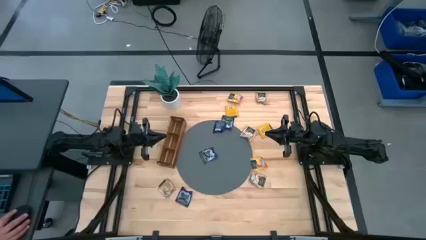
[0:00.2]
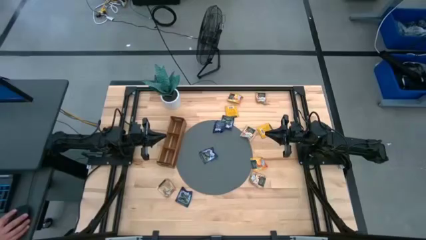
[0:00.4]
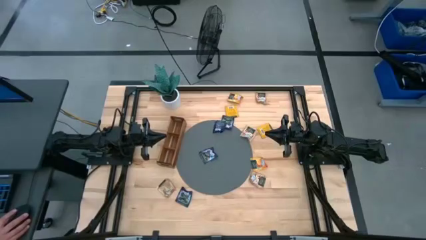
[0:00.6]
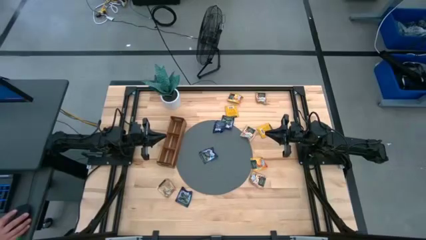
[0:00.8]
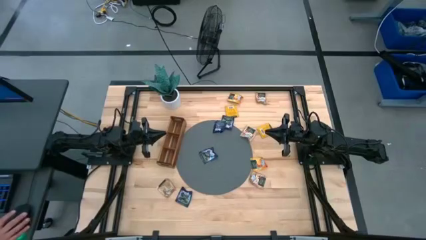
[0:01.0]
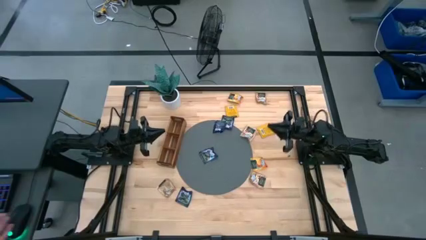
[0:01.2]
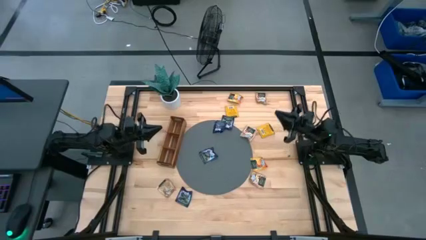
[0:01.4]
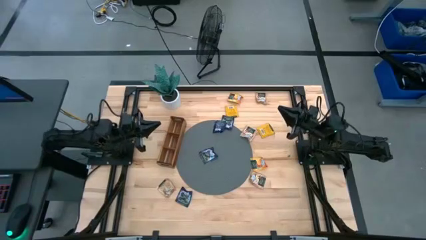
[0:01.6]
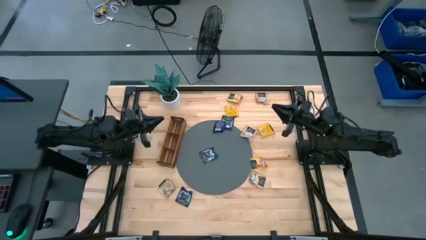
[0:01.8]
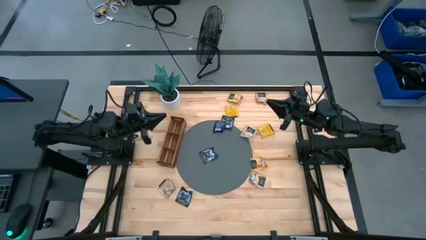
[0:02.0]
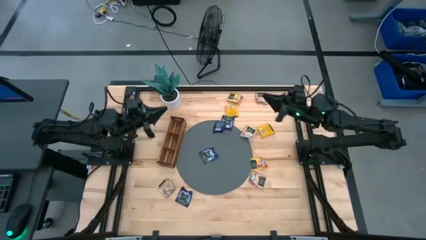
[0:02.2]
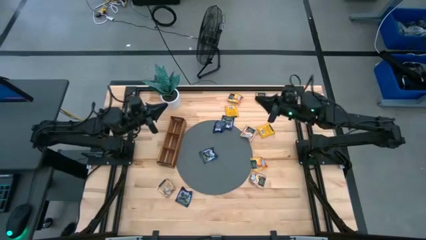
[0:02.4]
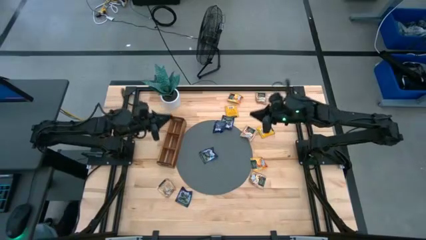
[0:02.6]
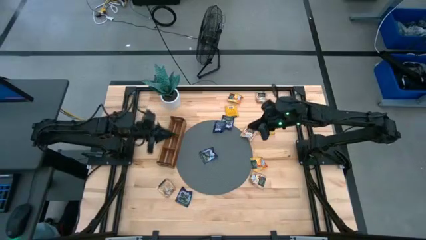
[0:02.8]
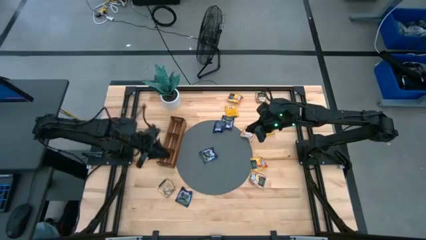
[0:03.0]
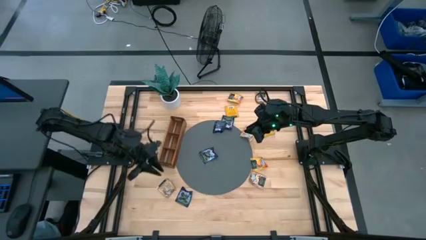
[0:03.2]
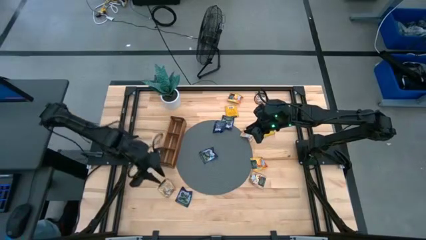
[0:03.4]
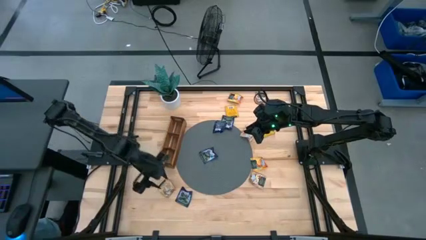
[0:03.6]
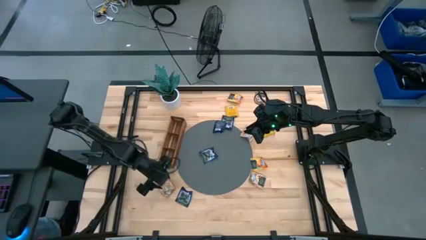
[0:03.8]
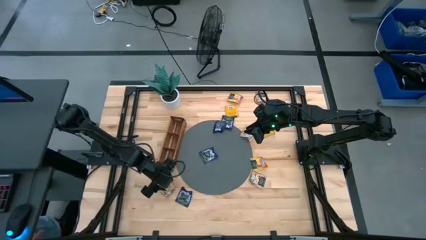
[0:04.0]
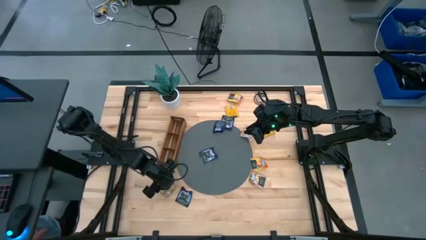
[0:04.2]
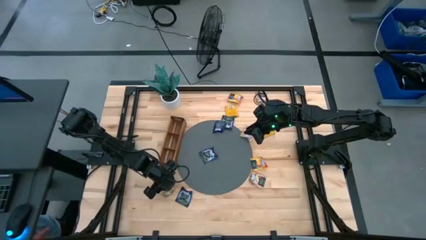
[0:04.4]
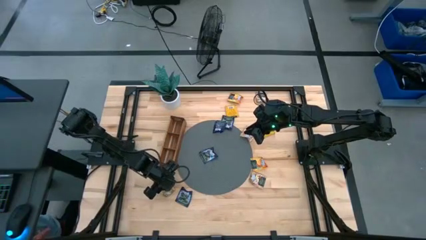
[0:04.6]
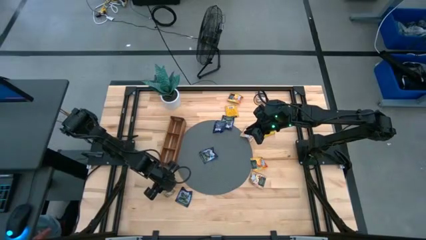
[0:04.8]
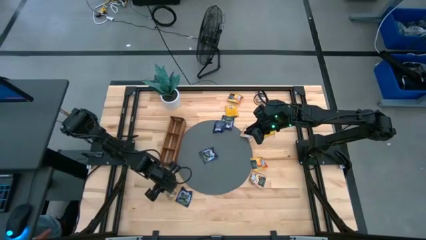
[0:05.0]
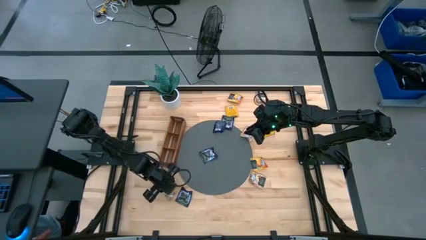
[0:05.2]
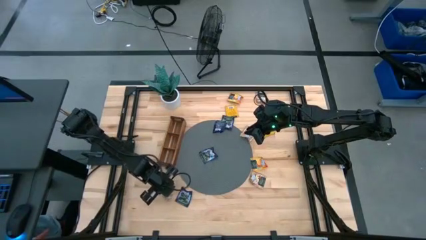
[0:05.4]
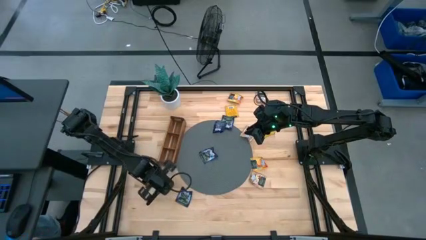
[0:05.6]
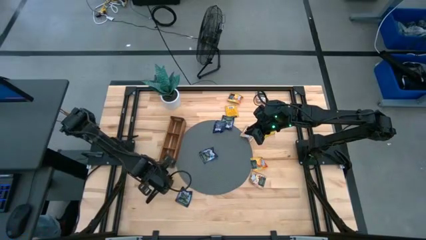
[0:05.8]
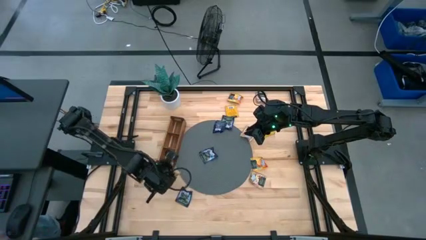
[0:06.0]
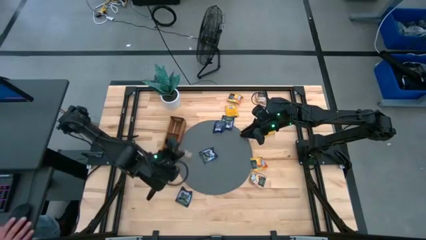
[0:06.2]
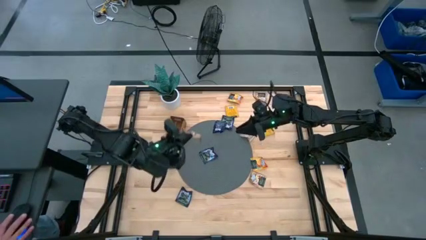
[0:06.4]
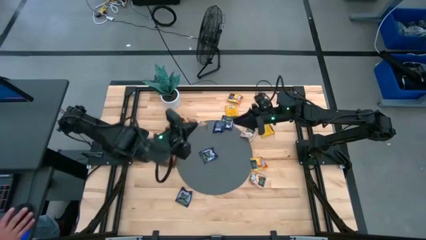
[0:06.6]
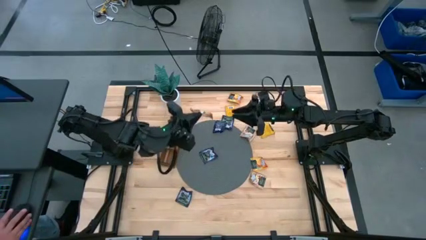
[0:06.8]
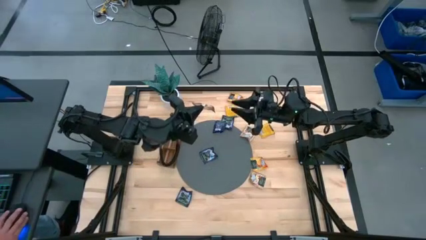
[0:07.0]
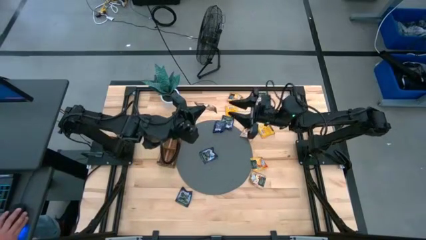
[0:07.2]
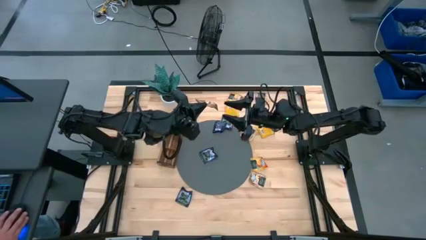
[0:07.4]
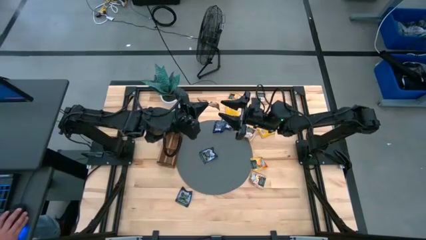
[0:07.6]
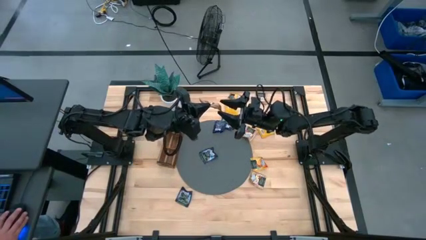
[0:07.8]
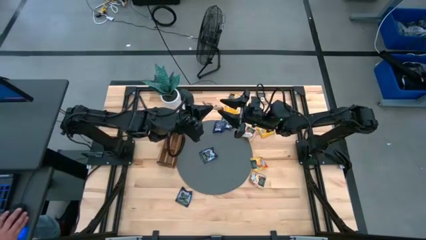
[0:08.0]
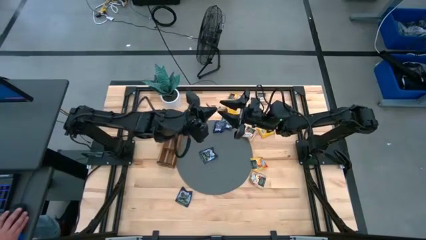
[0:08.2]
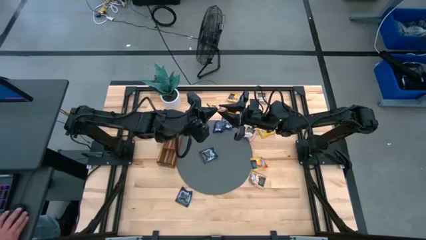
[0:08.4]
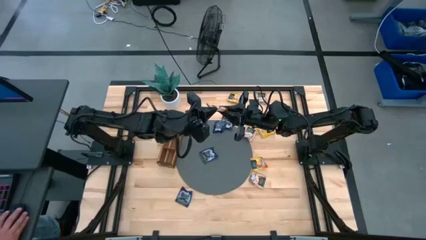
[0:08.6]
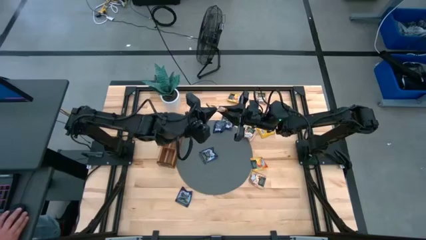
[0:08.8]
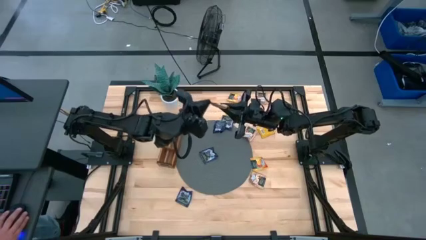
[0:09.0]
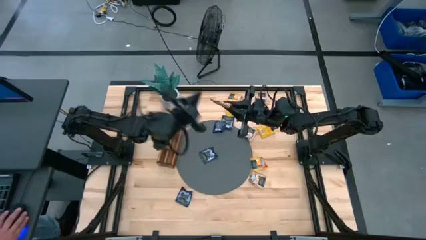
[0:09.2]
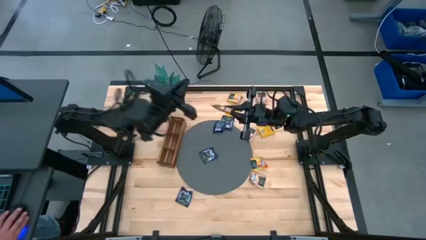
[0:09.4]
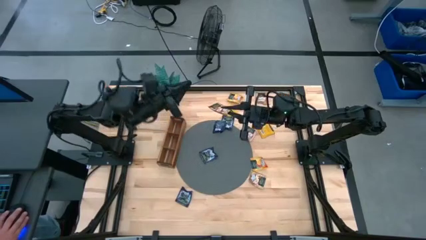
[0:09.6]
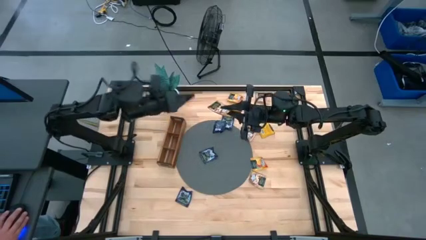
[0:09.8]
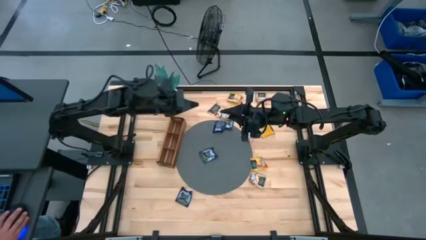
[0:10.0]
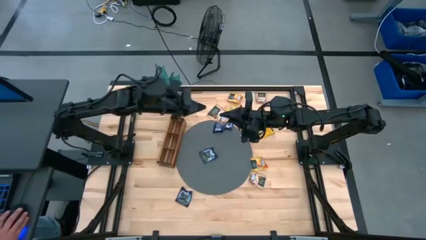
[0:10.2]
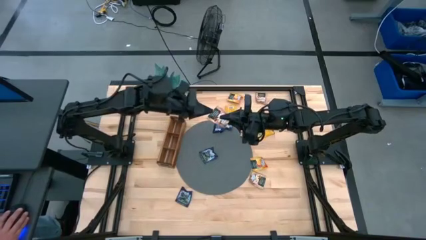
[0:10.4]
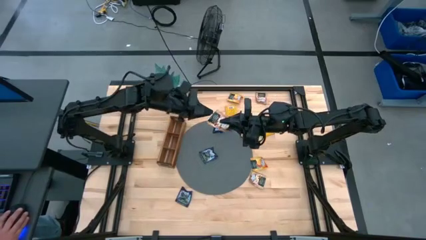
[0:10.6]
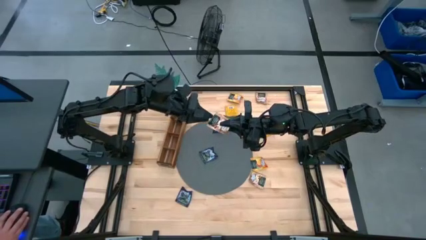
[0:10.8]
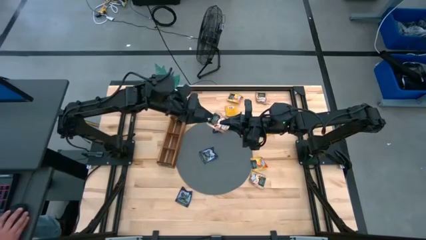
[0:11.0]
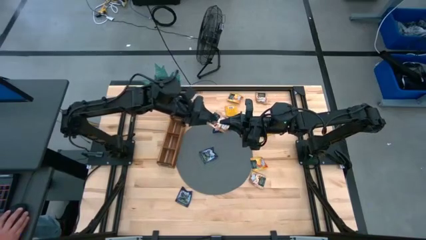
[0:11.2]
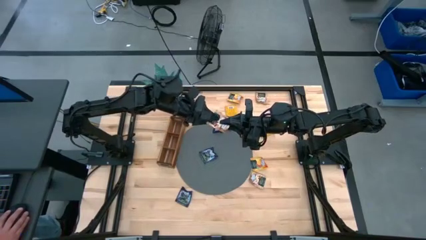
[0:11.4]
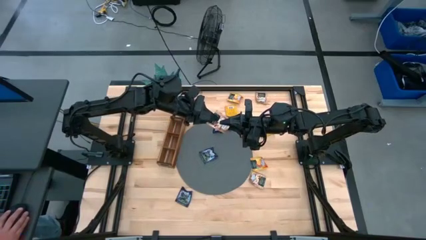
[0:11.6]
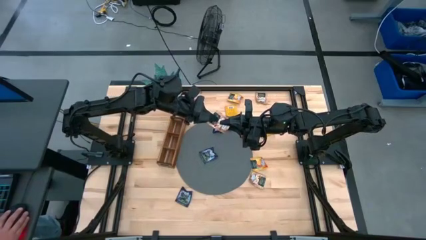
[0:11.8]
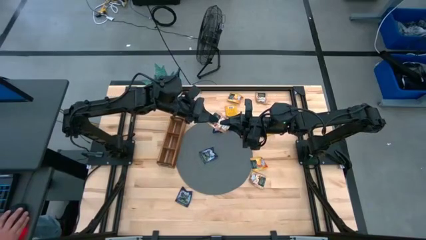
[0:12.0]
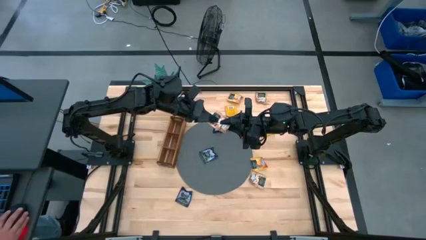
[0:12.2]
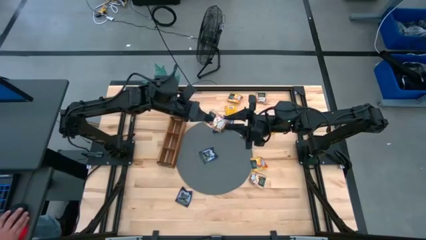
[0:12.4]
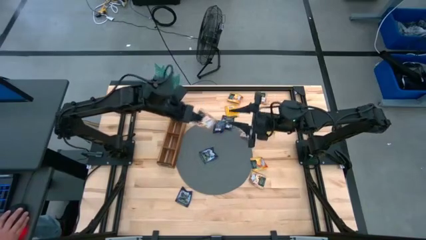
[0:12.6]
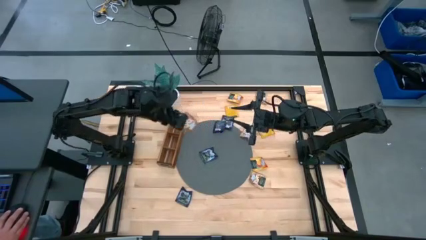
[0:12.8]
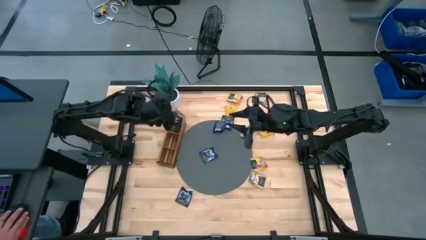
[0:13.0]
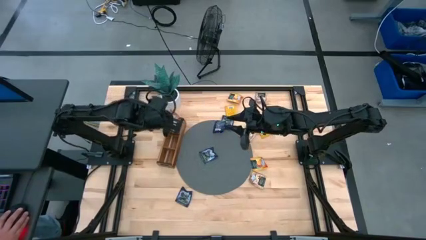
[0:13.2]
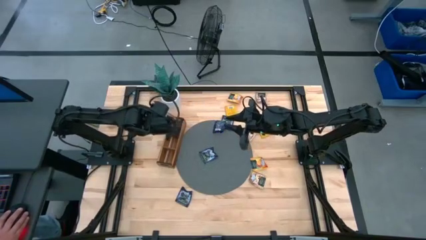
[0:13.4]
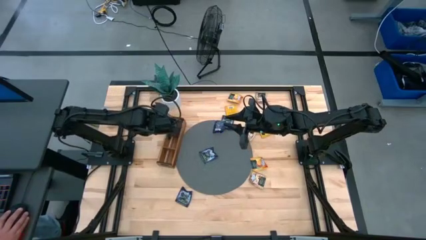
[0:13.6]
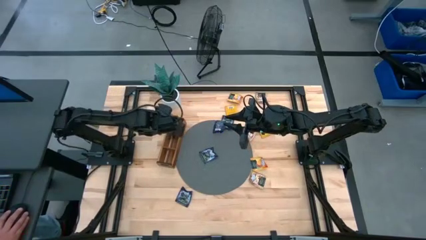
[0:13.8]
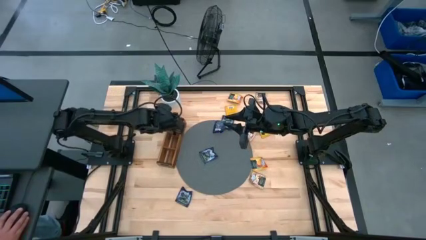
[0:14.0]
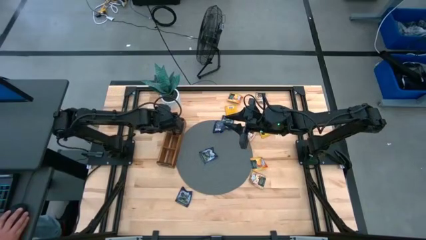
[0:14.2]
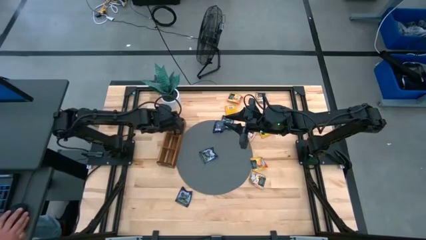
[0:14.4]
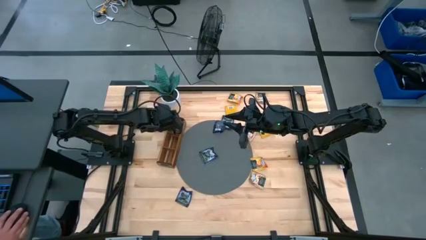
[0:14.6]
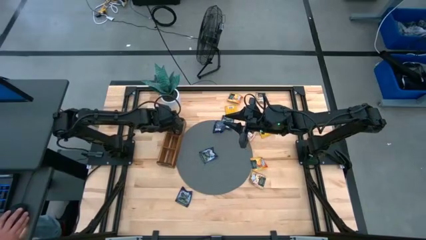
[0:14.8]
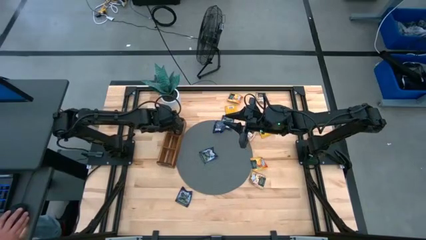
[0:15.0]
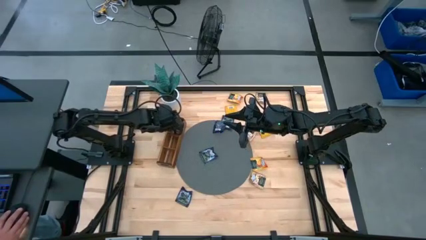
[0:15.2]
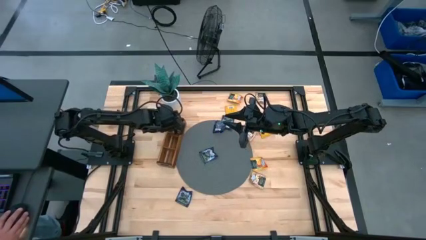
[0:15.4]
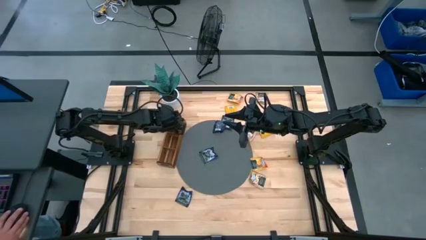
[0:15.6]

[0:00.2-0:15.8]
Task: Pick & Place Tea
Put the brown tea bag into the top section of the wooden organizer
